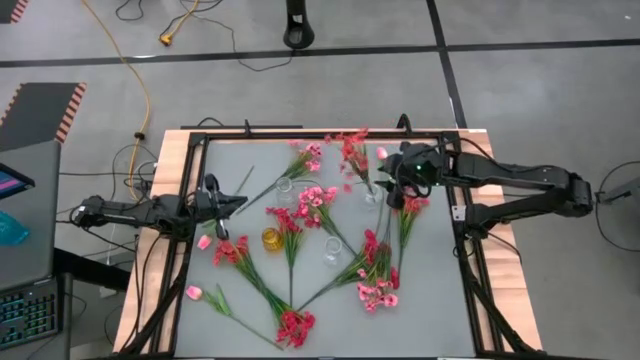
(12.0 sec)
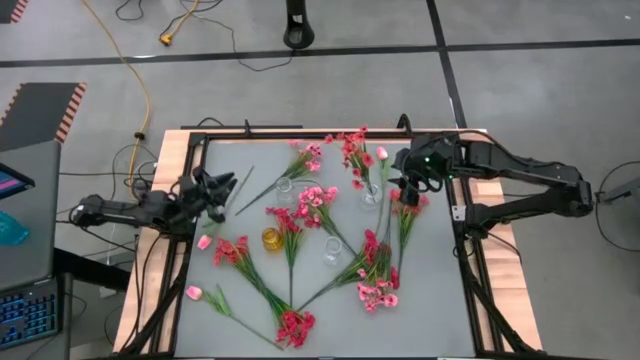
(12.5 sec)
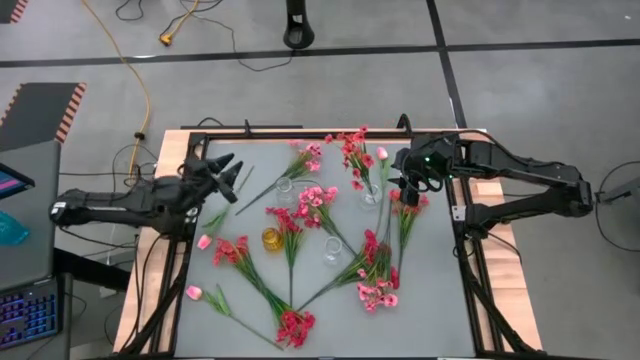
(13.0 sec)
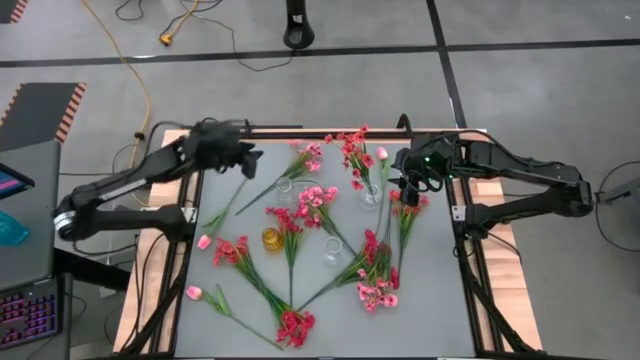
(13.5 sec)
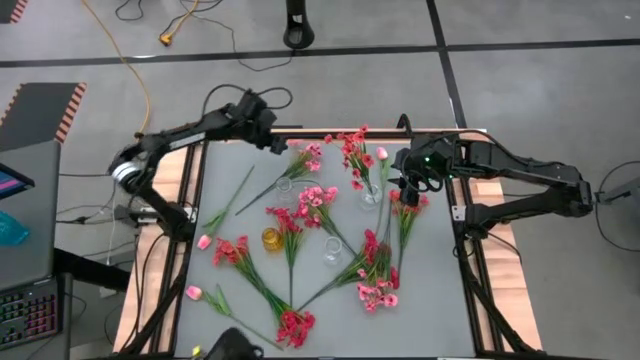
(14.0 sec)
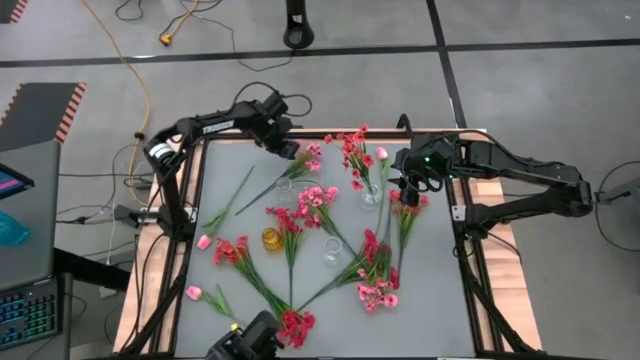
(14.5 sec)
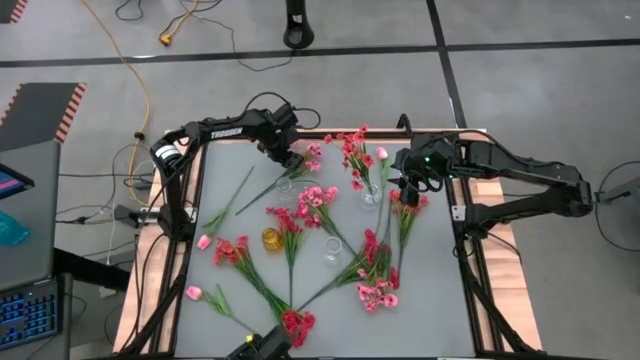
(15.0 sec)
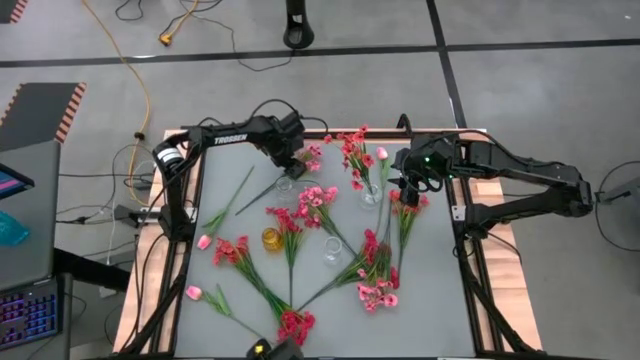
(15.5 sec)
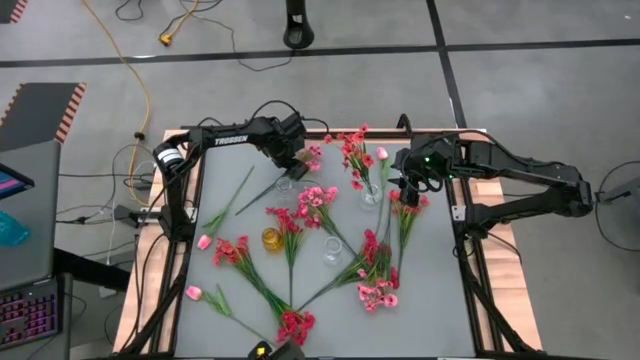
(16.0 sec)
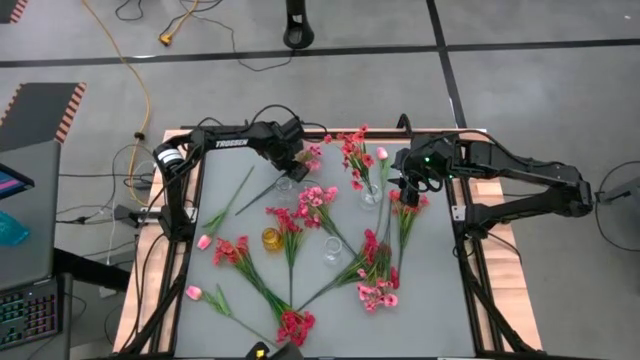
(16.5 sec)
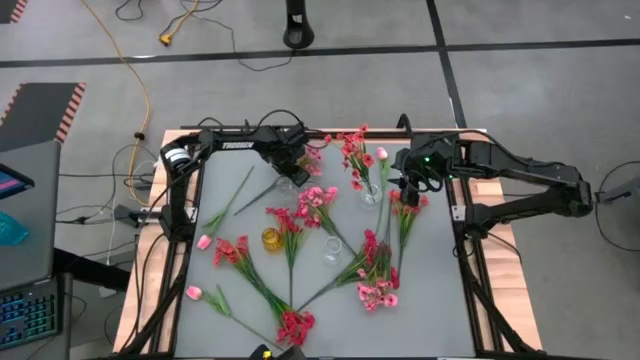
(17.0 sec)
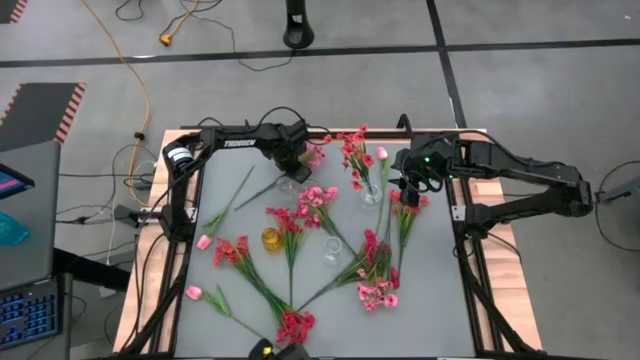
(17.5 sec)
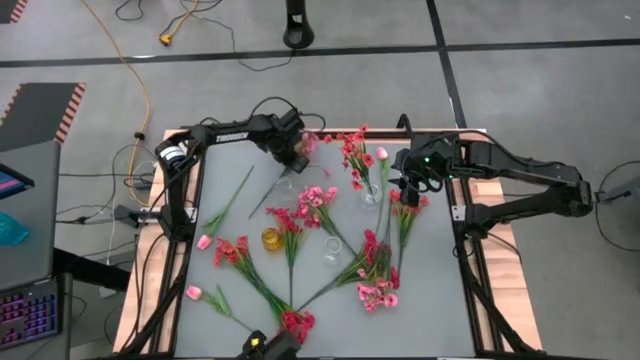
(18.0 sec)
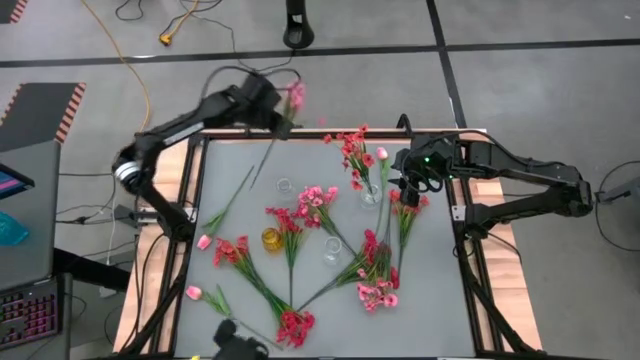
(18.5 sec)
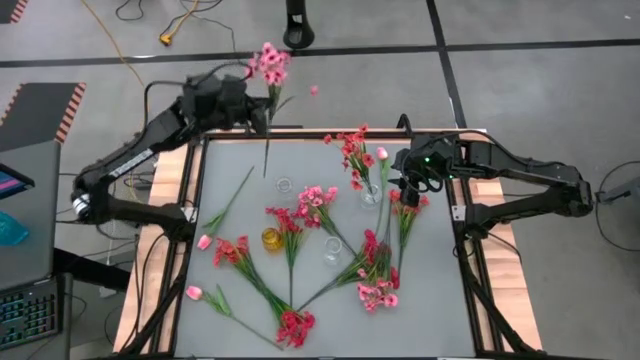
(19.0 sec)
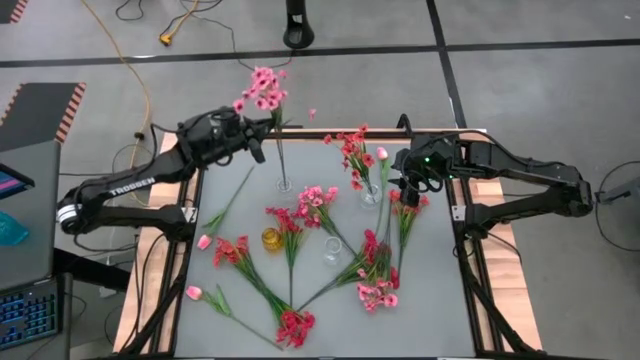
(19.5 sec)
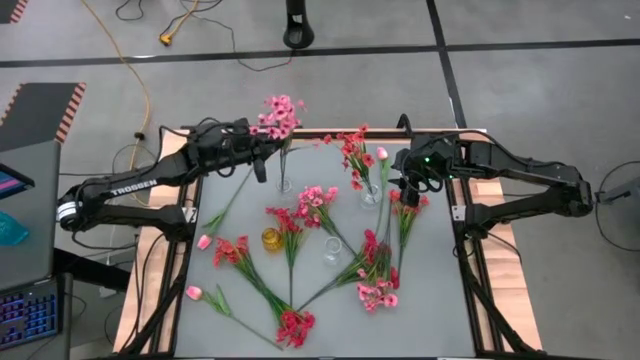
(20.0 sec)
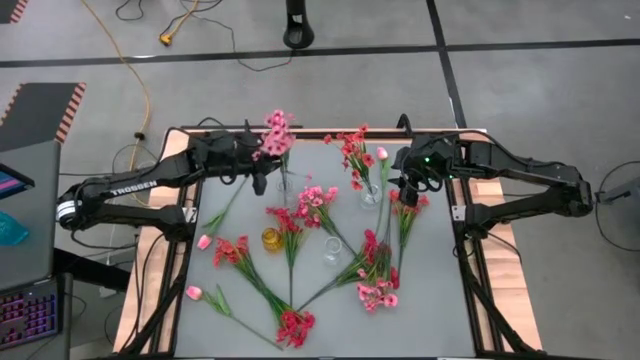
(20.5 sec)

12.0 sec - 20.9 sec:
Task: Sort flowers into vase by color
Put the top pink flowers into the top left transparent vase

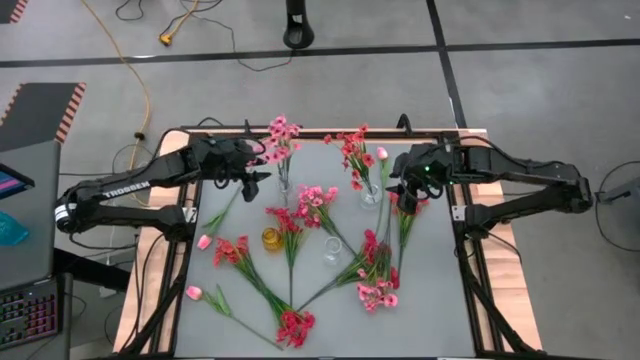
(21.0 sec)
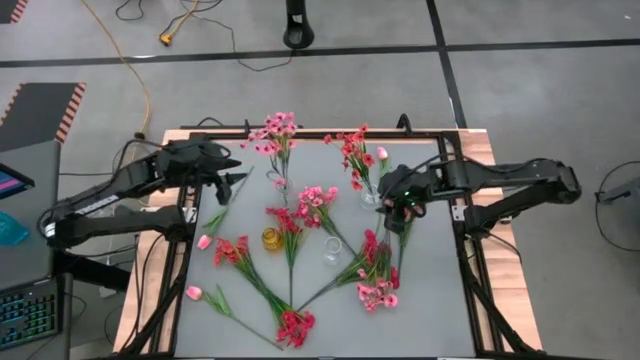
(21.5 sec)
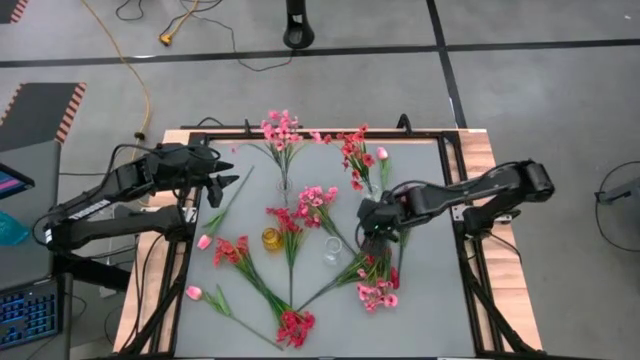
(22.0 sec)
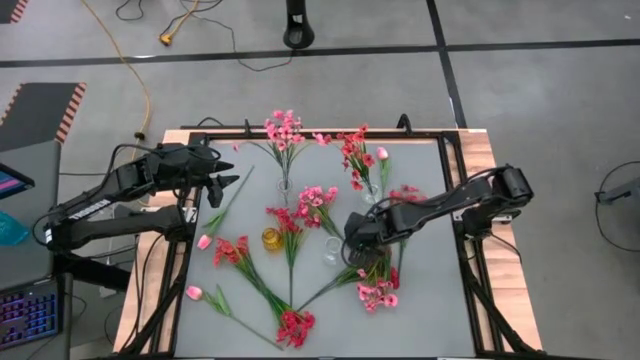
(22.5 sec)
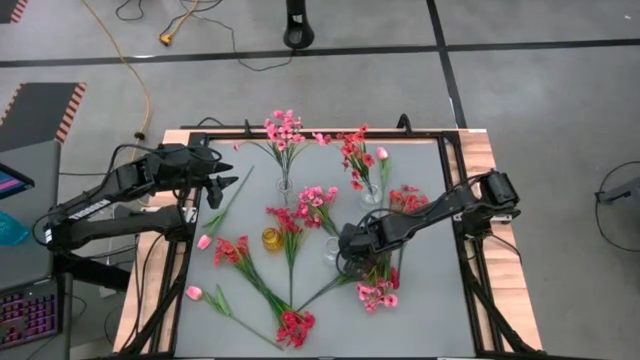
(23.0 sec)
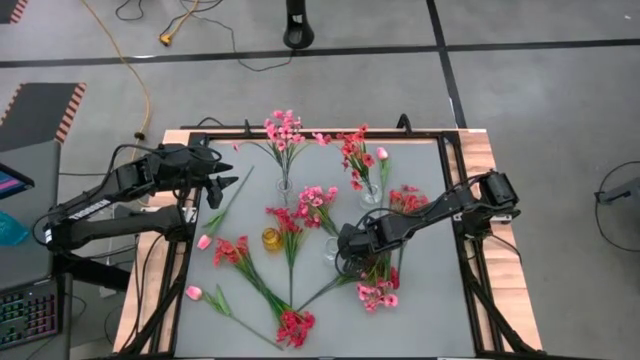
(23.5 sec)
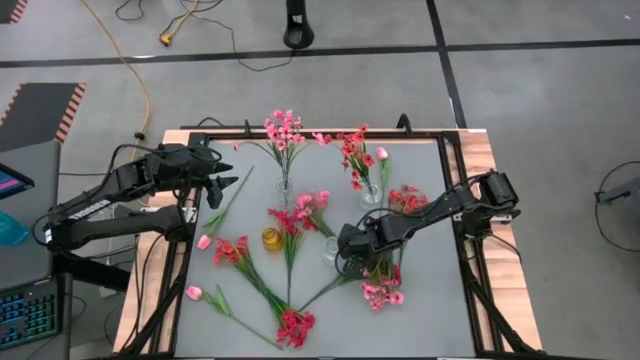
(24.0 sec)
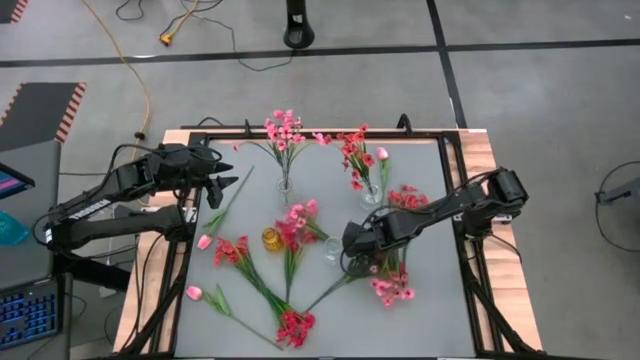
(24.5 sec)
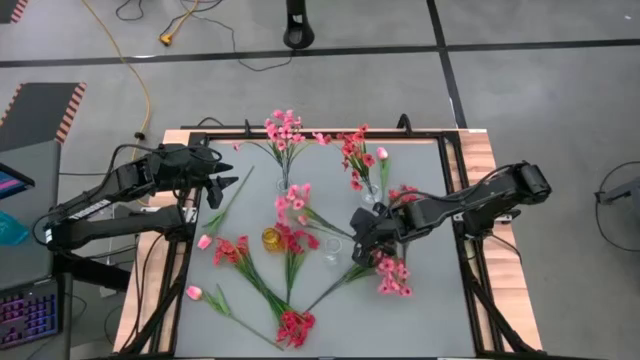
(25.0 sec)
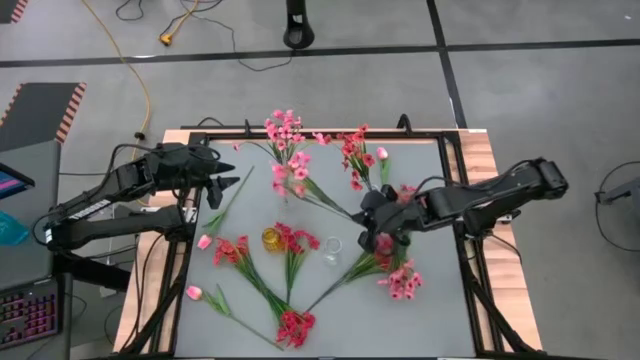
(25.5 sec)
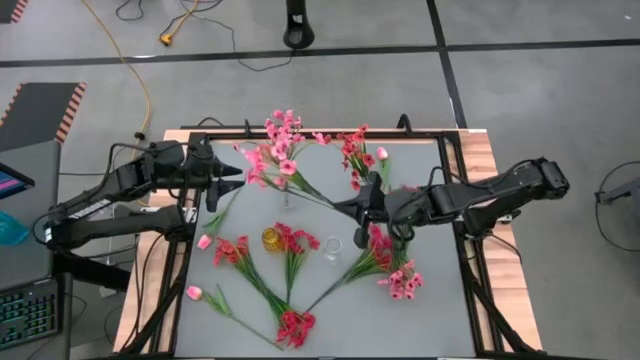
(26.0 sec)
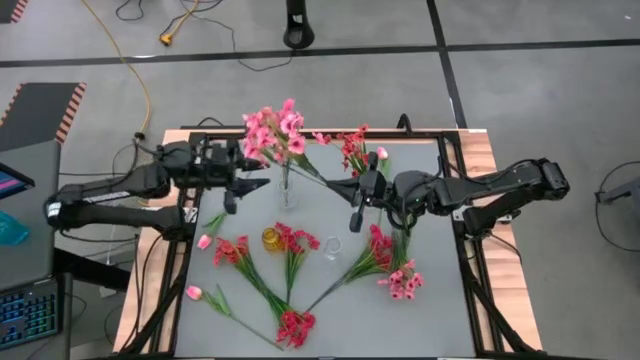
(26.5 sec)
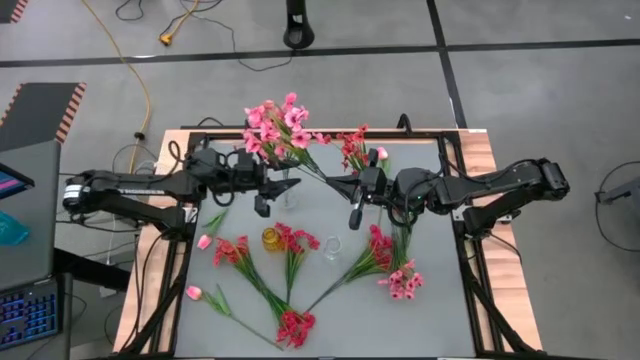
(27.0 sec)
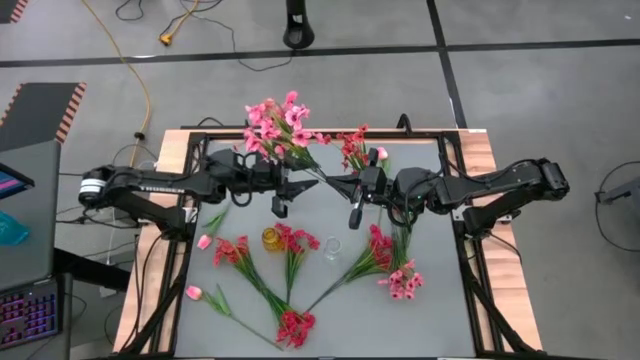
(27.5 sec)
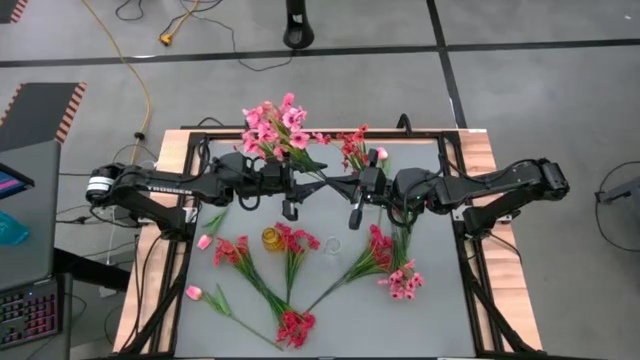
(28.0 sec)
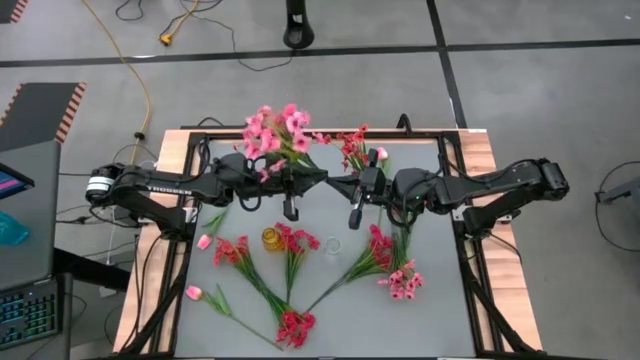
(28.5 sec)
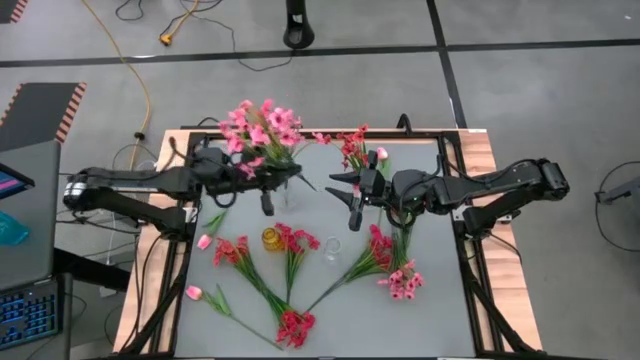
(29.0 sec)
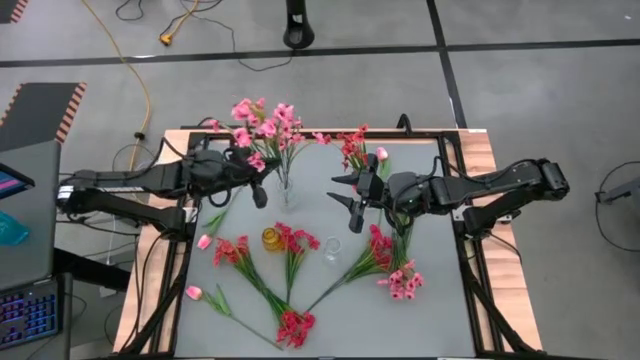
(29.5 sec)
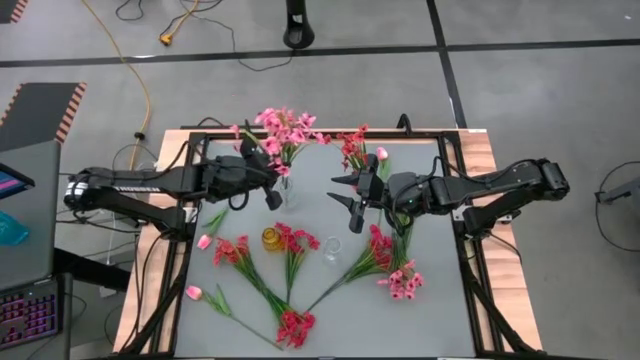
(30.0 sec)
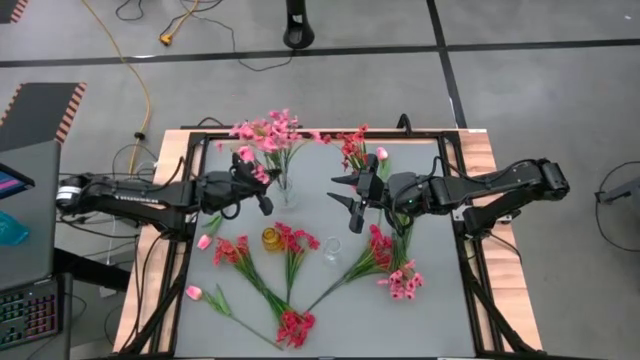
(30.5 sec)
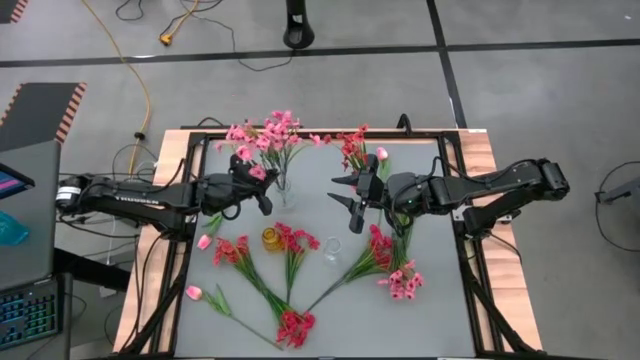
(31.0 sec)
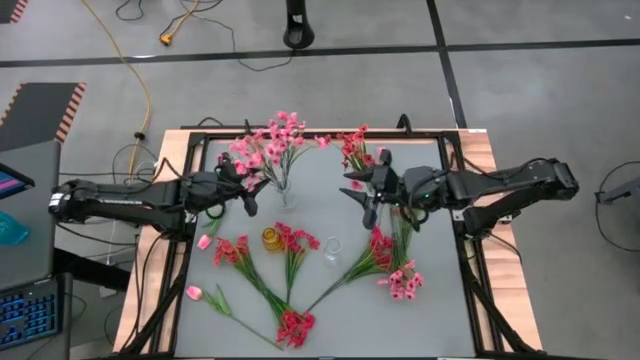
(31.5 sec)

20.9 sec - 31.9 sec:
Put the top pink flowers into the top left transparent vase

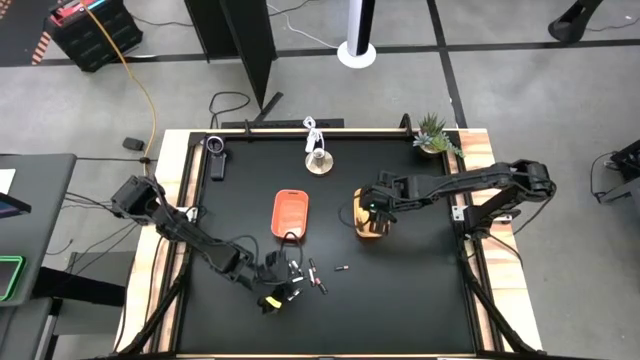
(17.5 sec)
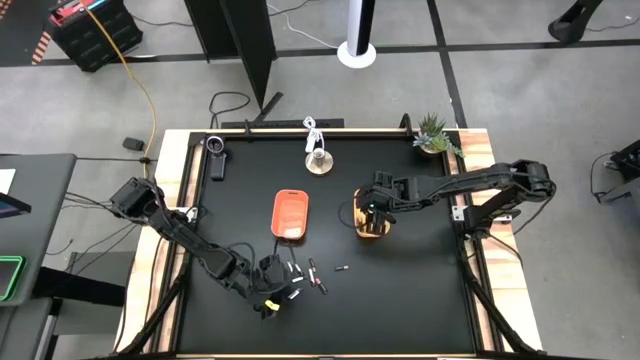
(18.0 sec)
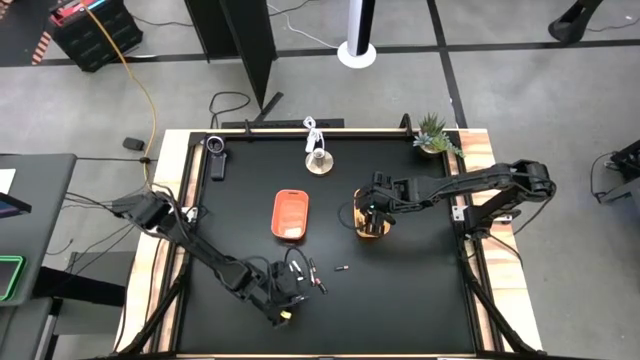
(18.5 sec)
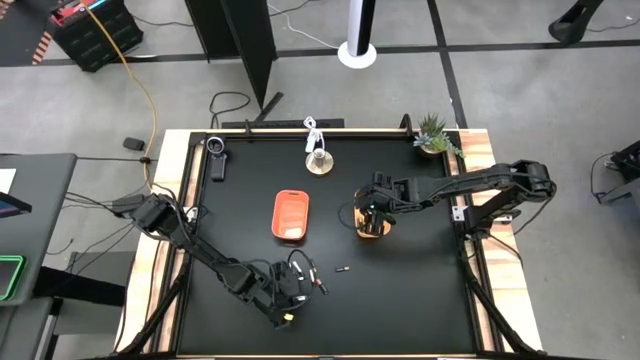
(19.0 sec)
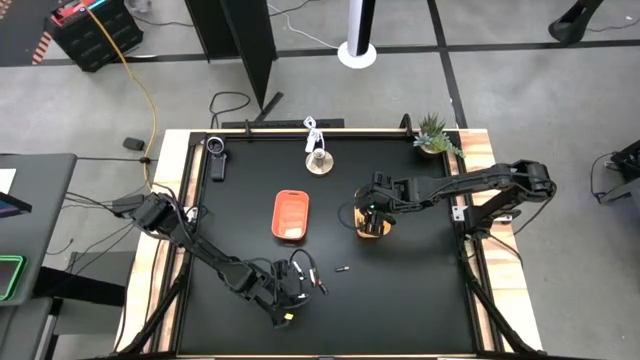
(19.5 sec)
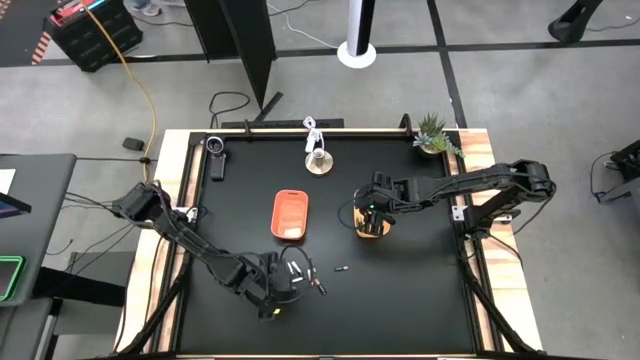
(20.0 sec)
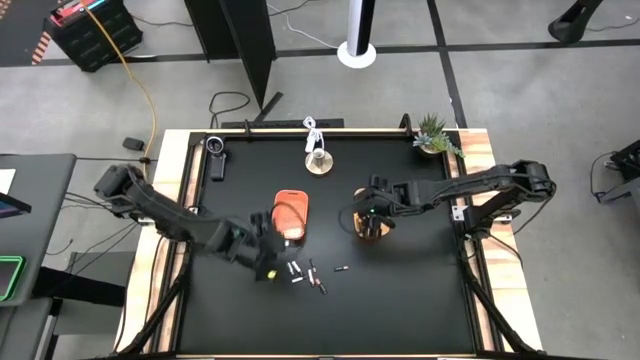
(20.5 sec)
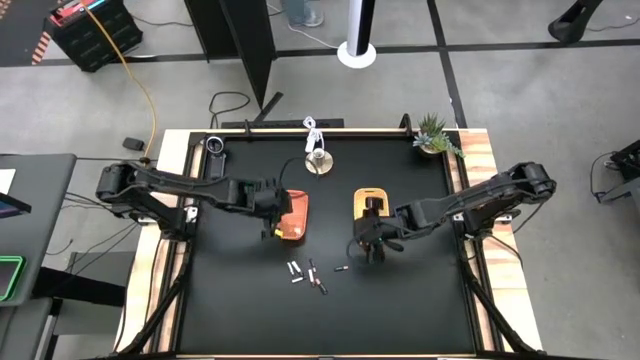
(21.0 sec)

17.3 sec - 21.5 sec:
Task: Sort batteries
Put the silver battery into the orange bin
